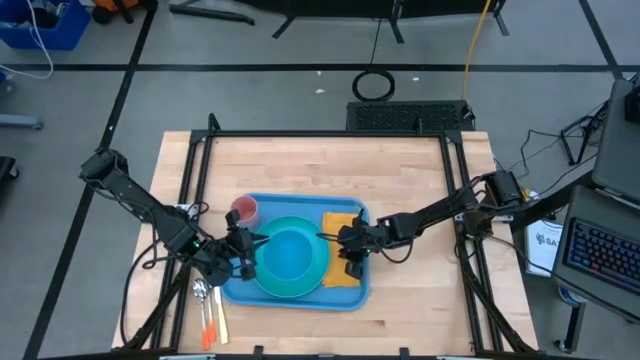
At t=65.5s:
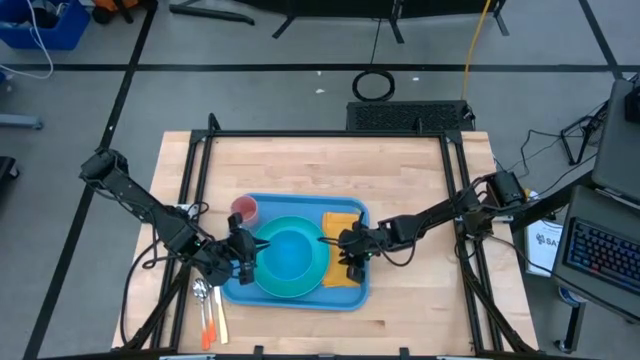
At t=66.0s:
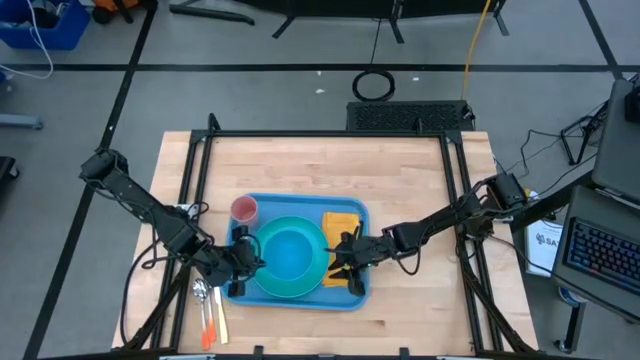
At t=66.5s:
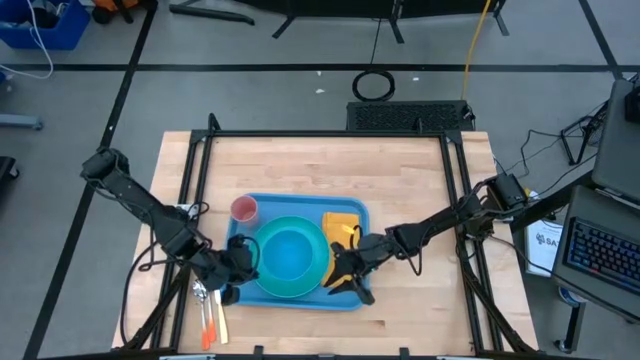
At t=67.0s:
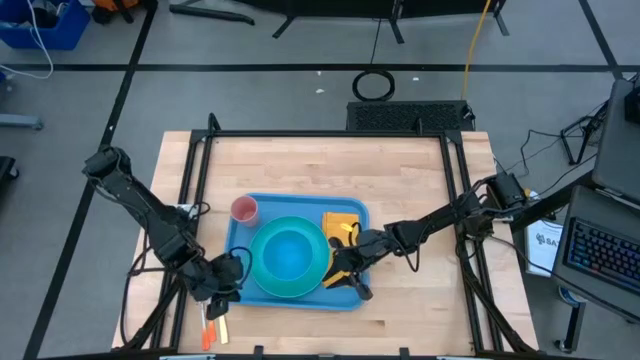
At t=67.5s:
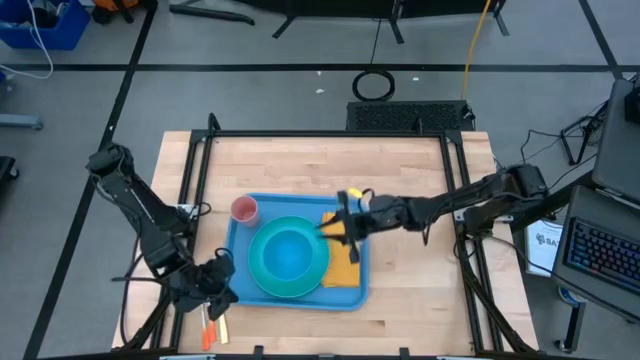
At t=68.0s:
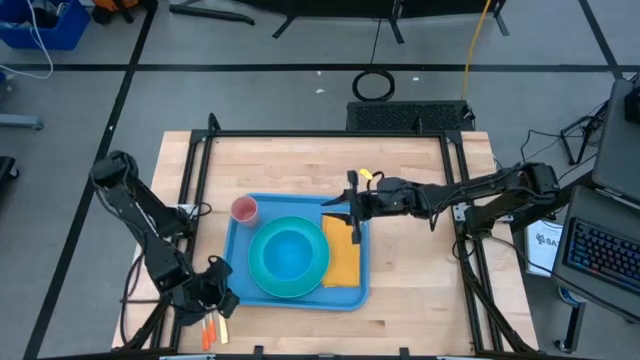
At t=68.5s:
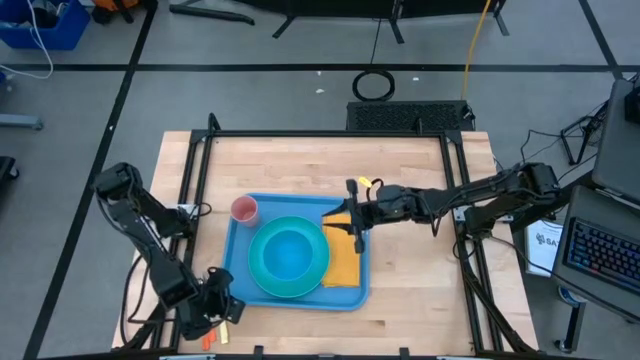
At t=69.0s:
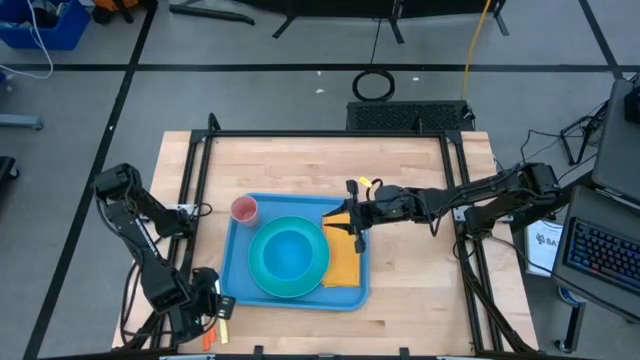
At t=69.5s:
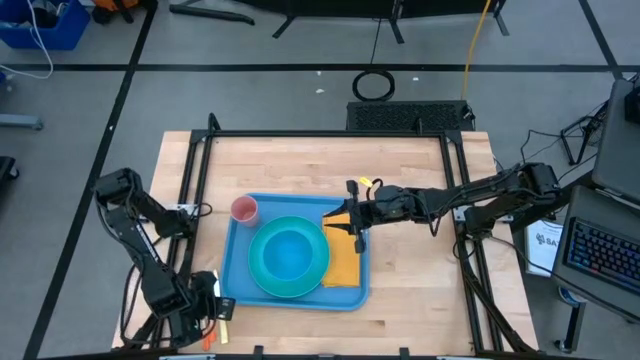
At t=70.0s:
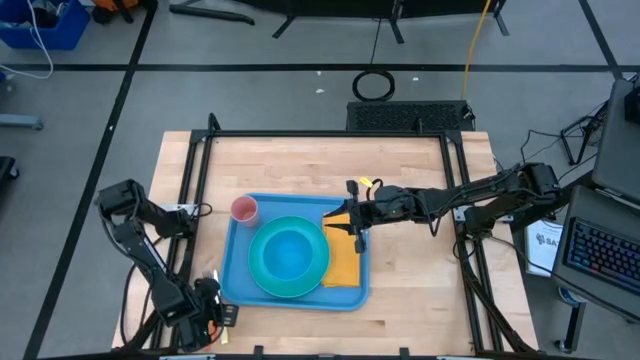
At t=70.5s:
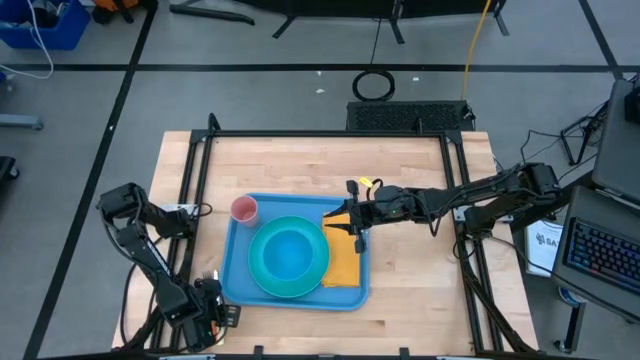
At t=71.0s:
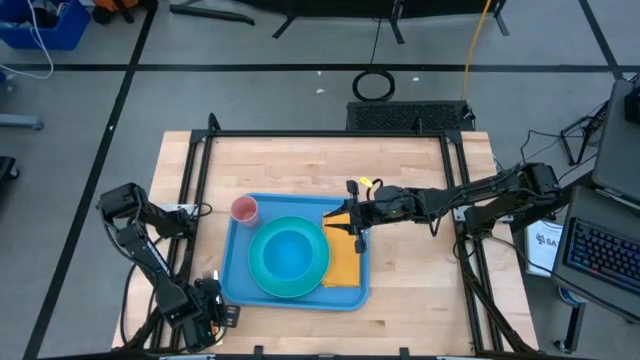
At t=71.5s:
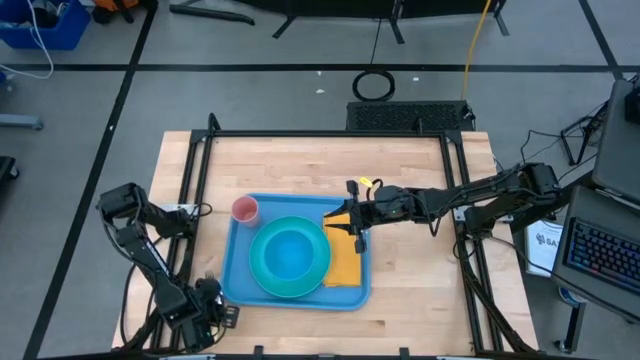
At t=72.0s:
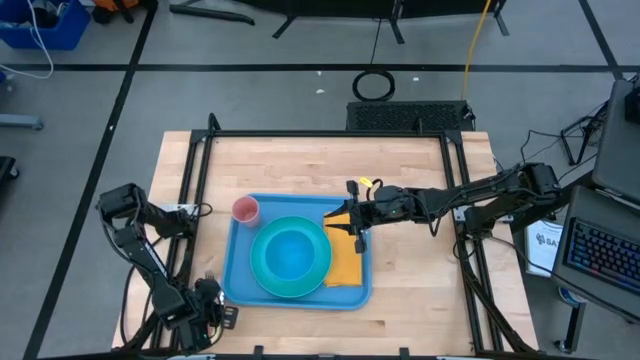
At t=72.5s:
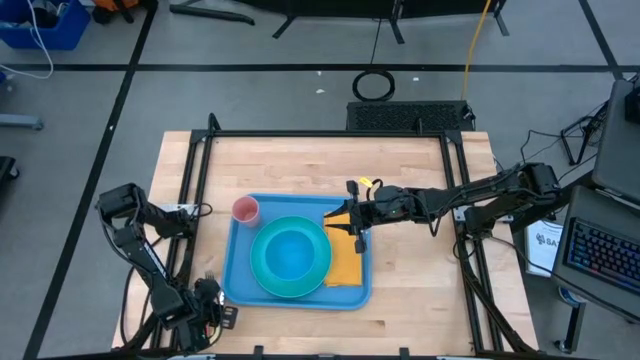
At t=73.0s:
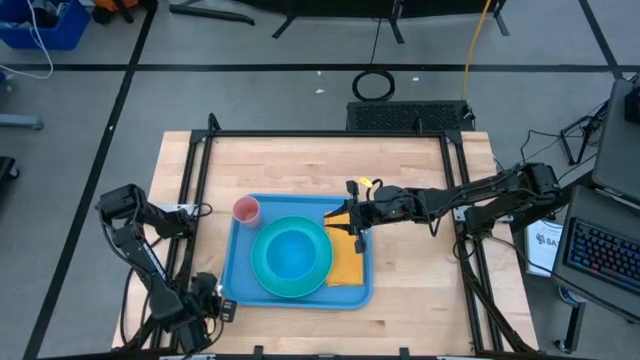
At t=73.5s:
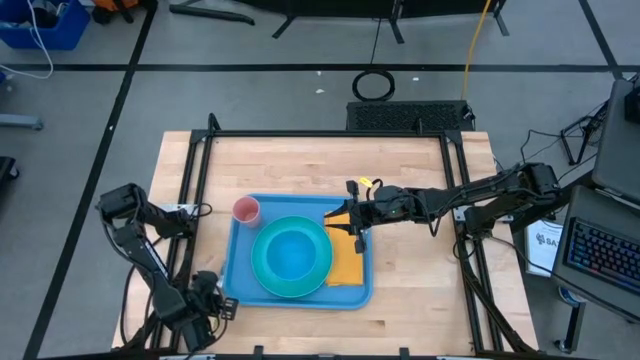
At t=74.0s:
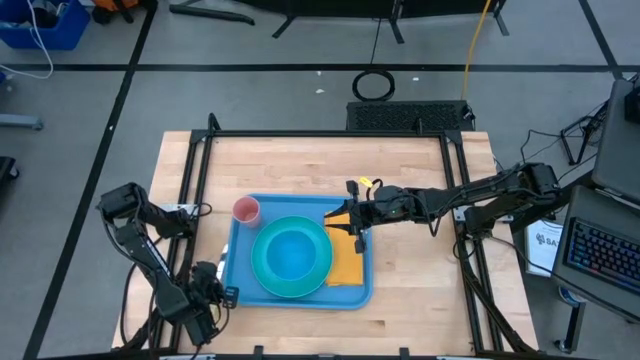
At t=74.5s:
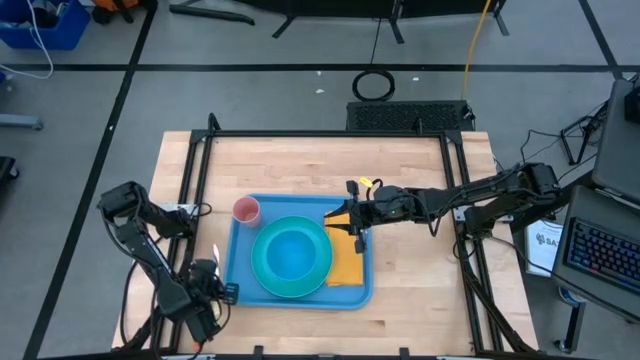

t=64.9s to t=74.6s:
Task: Set up tray
Put the yellow knife in the left of the yellow napkin

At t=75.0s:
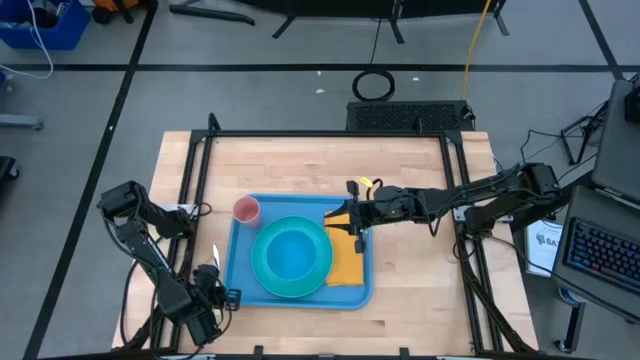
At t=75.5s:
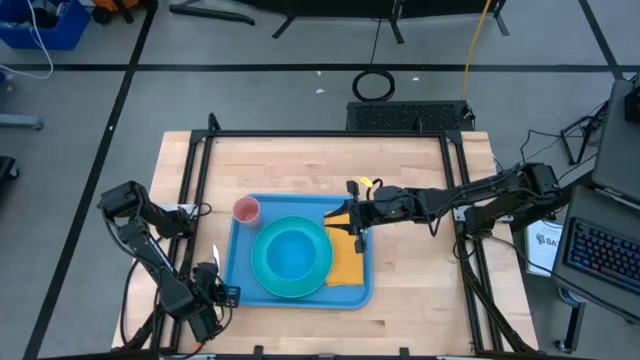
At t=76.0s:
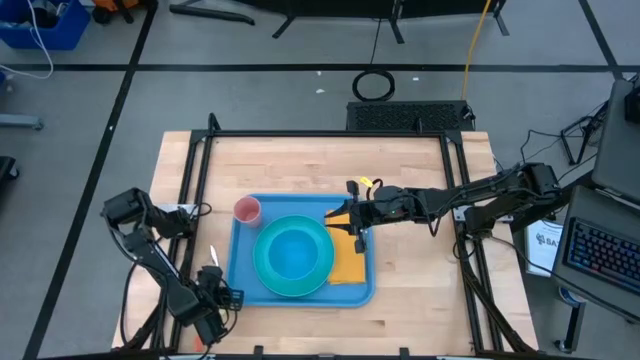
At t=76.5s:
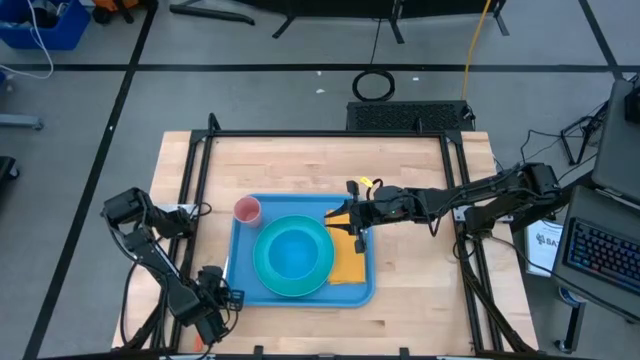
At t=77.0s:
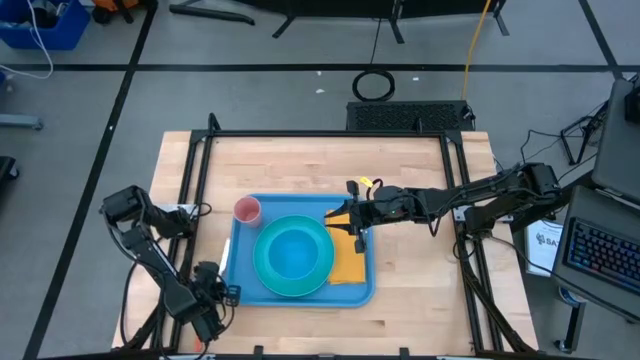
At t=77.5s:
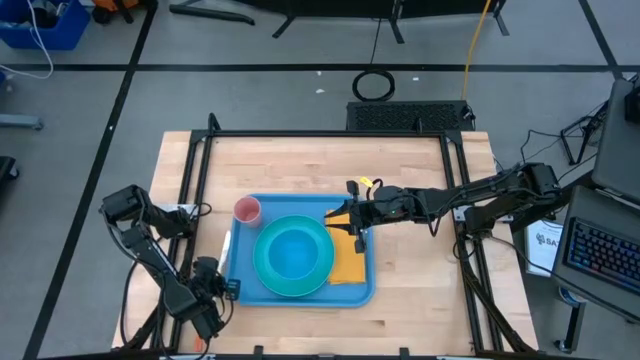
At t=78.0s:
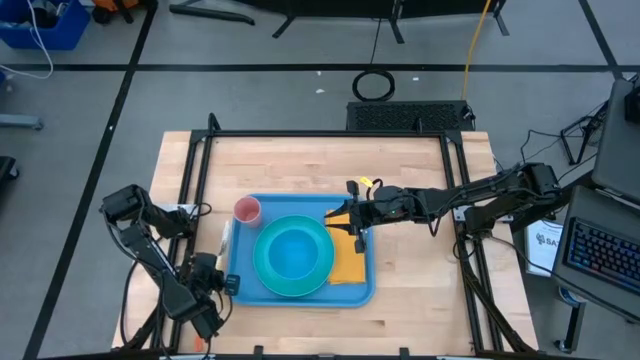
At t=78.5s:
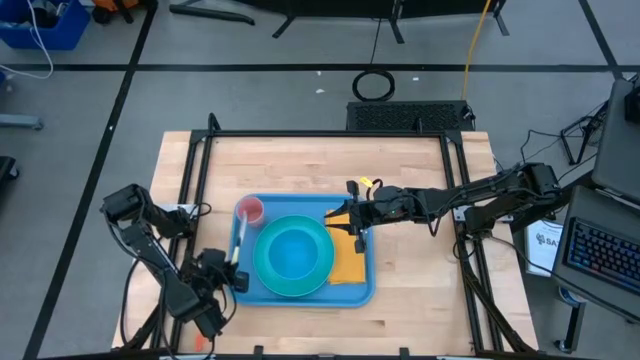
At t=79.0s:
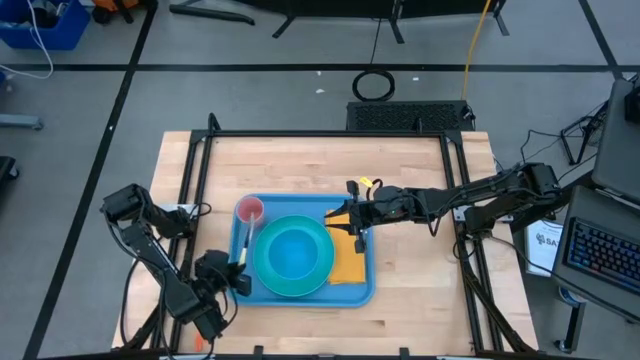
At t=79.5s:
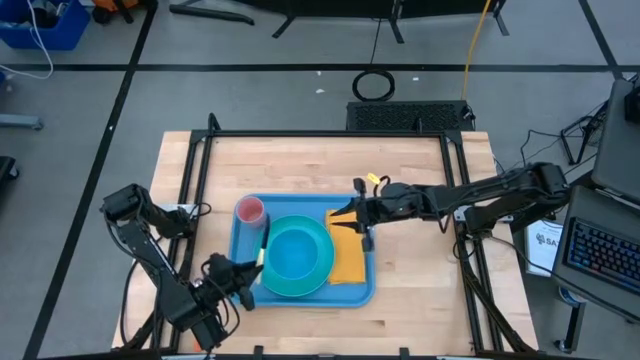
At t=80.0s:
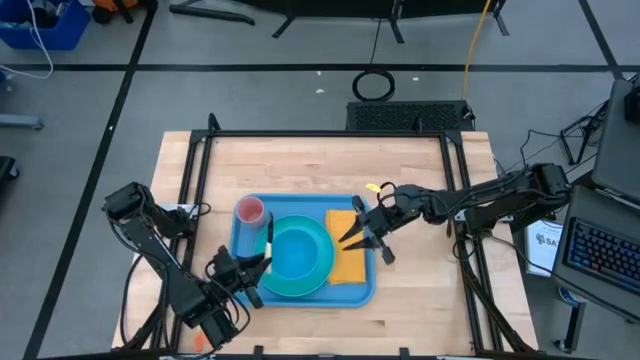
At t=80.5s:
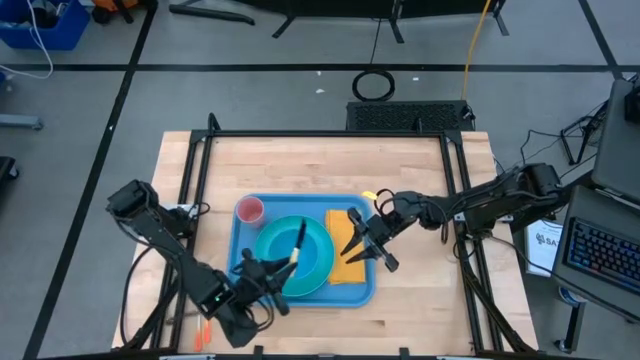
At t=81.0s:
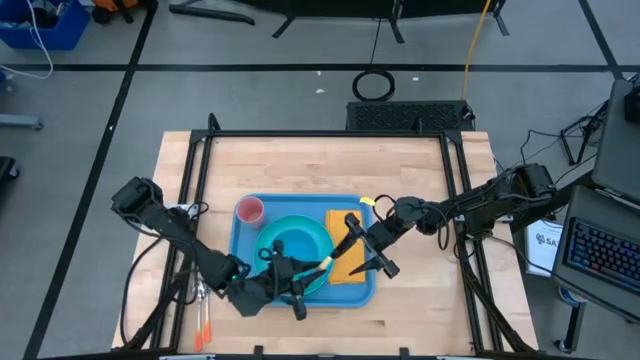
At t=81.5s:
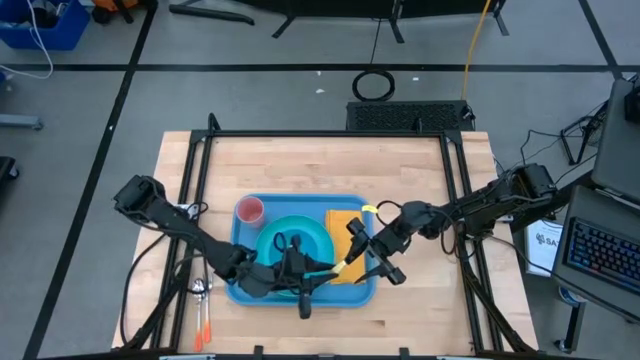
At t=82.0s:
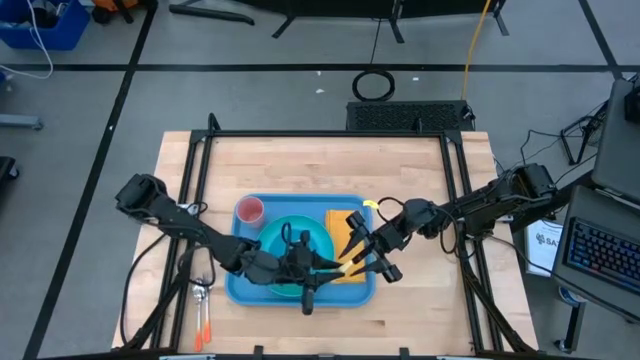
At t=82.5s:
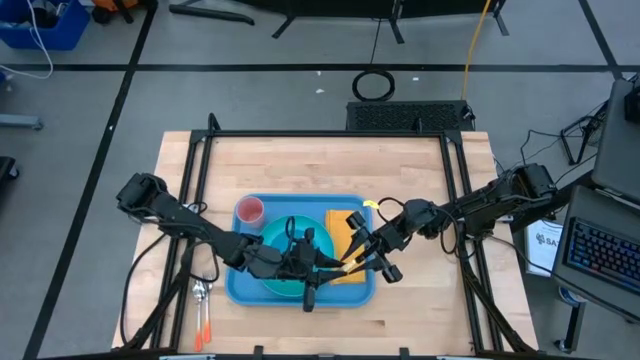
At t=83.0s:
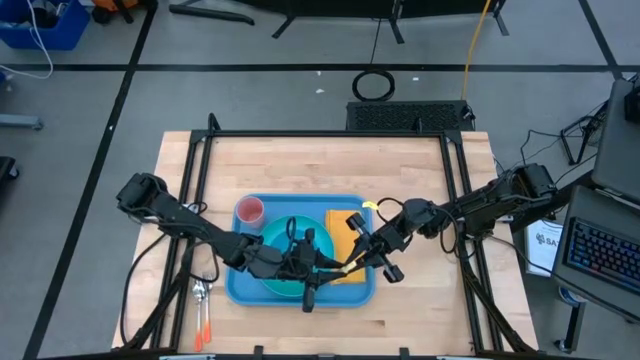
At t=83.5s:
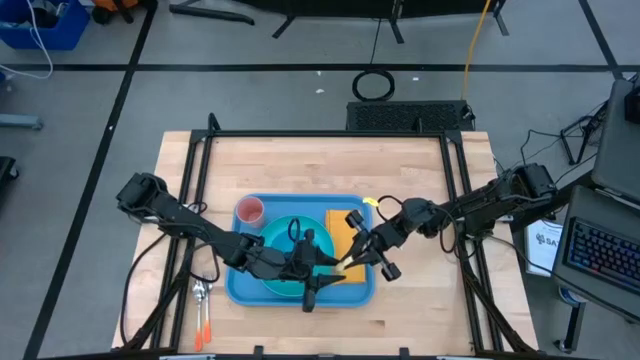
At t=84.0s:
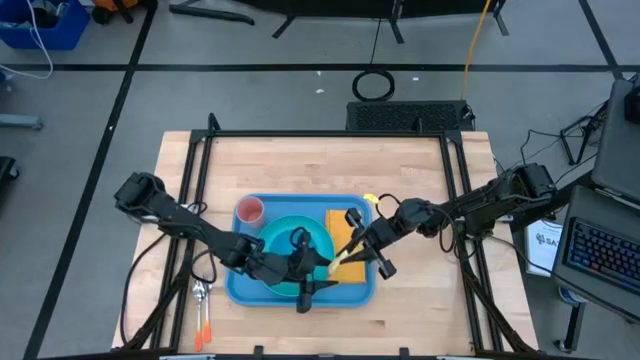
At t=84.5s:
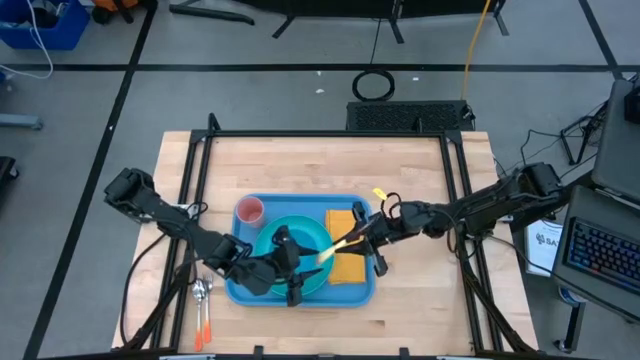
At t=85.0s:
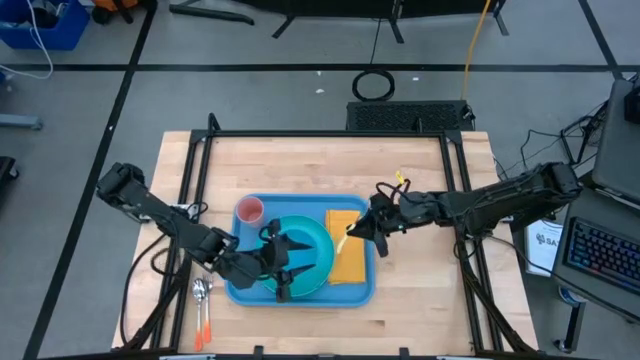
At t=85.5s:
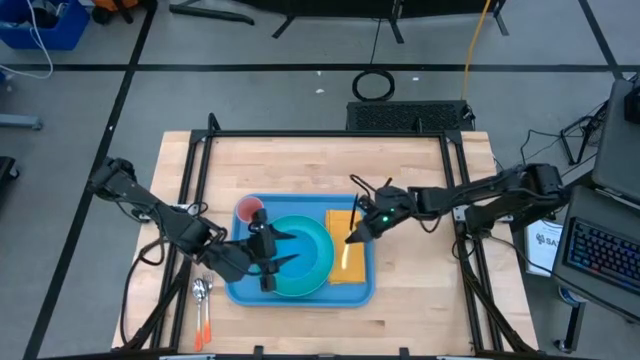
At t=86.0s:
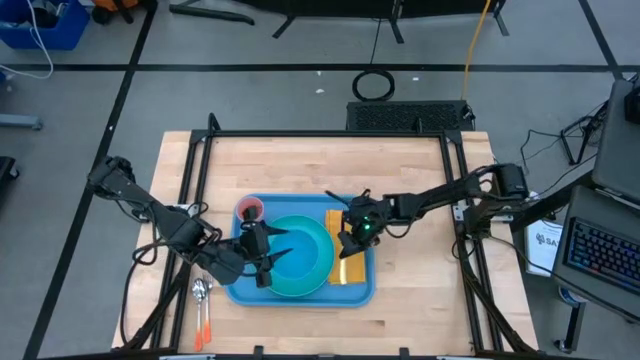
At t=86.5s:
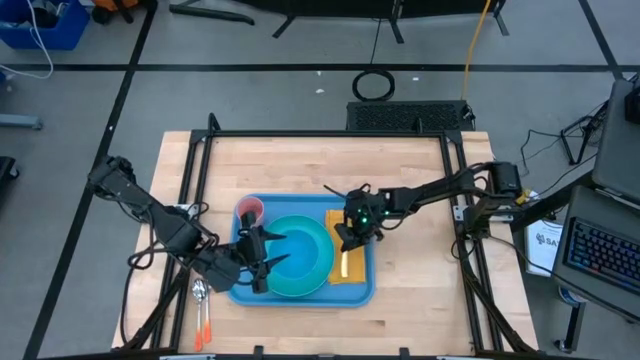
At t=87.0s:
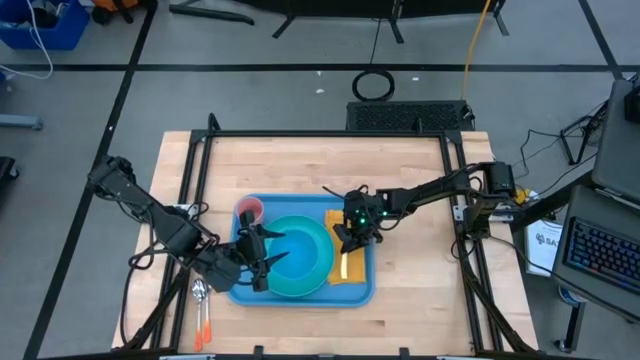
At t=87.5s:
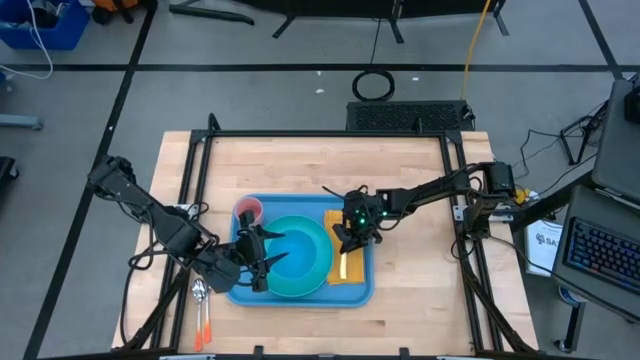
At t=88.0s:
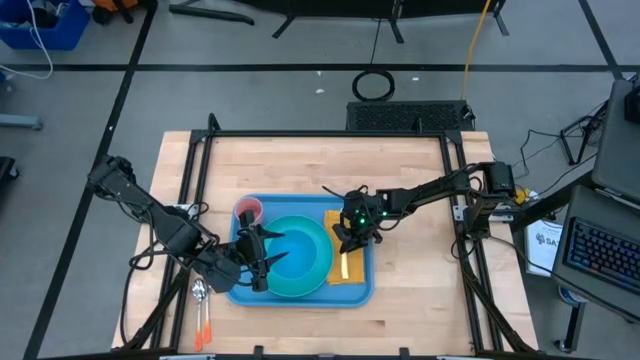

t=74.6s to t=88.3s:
Put the yellow knife in the left of the yellow napkin
